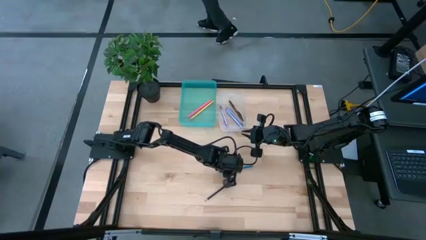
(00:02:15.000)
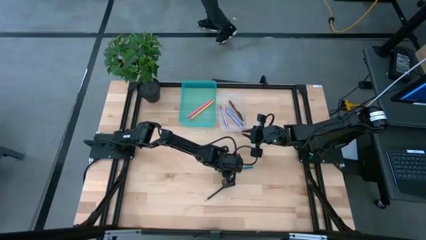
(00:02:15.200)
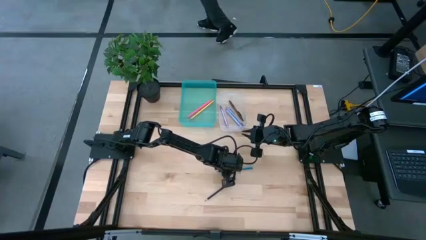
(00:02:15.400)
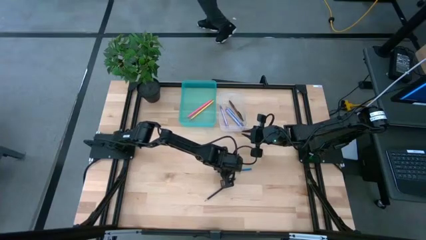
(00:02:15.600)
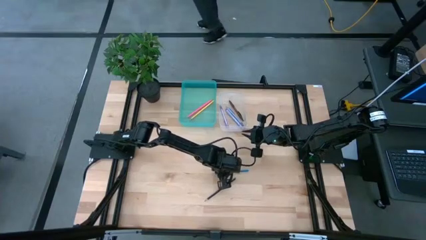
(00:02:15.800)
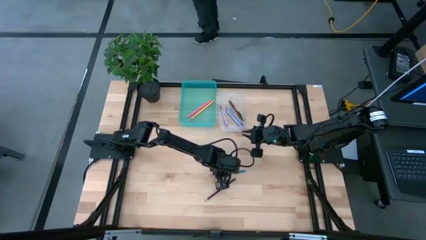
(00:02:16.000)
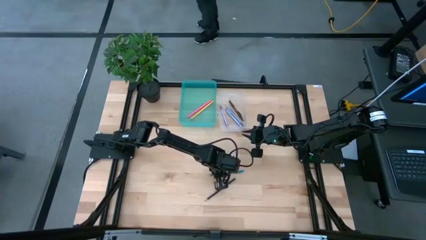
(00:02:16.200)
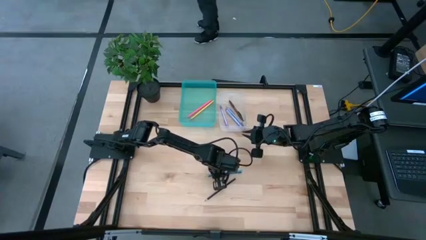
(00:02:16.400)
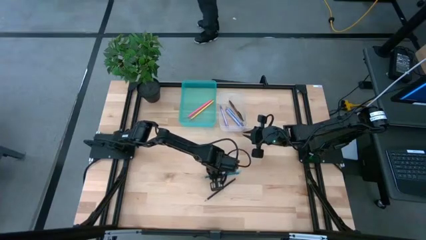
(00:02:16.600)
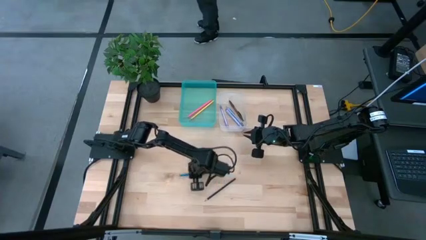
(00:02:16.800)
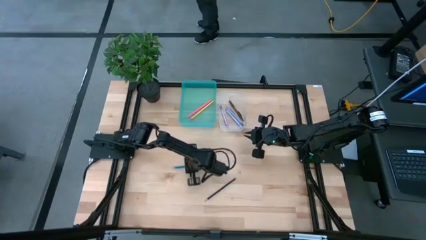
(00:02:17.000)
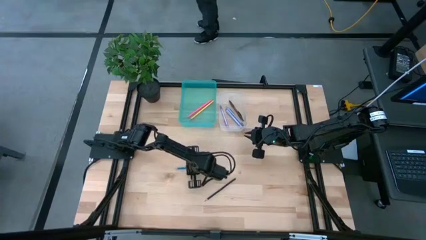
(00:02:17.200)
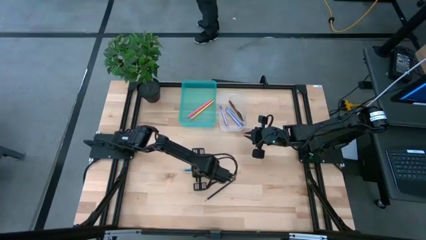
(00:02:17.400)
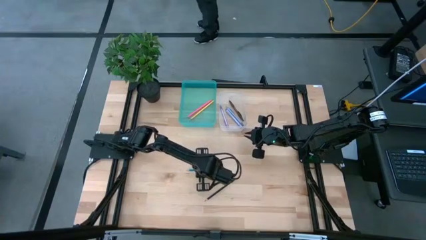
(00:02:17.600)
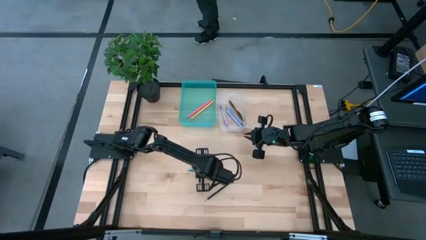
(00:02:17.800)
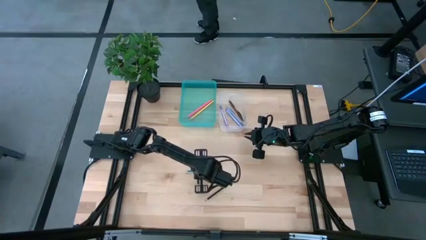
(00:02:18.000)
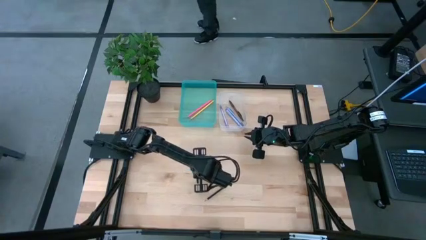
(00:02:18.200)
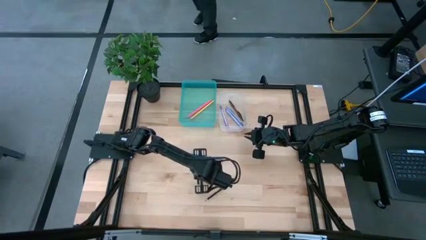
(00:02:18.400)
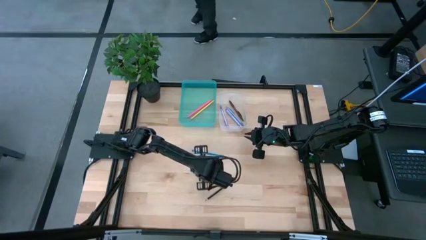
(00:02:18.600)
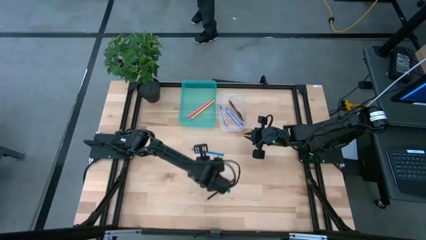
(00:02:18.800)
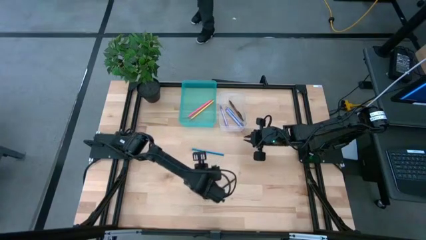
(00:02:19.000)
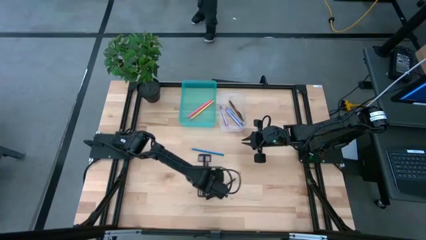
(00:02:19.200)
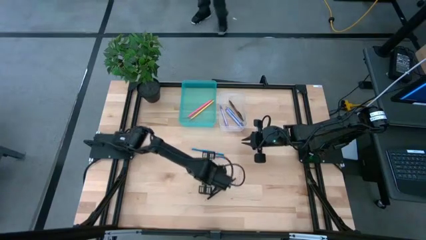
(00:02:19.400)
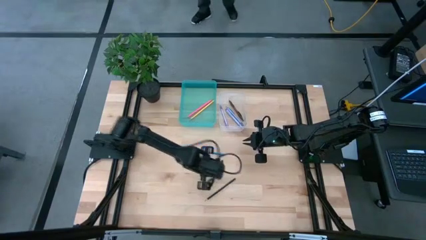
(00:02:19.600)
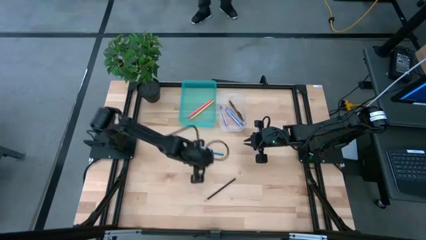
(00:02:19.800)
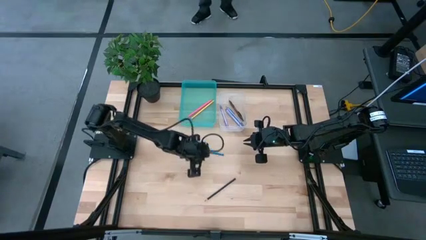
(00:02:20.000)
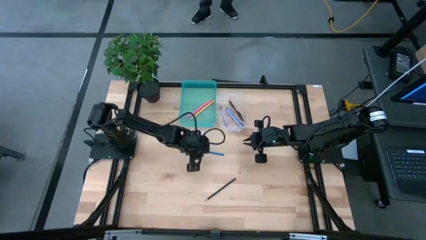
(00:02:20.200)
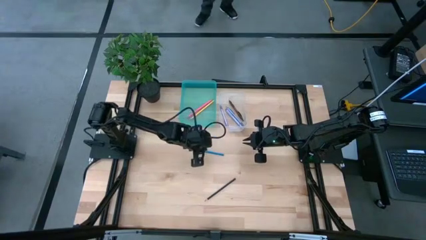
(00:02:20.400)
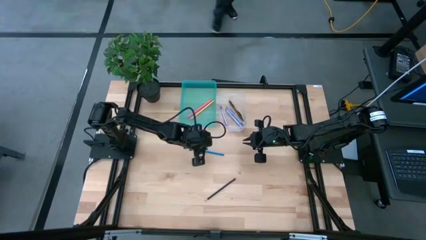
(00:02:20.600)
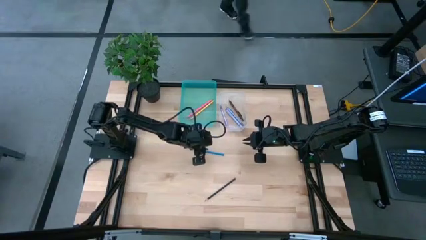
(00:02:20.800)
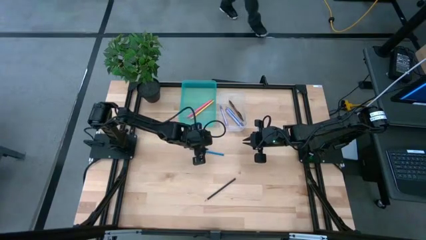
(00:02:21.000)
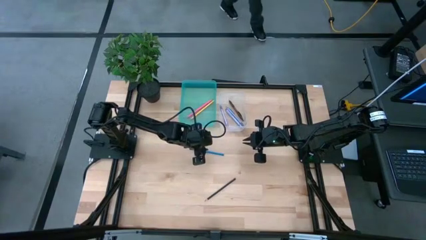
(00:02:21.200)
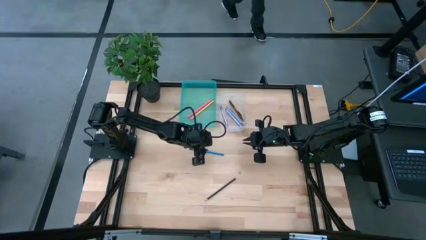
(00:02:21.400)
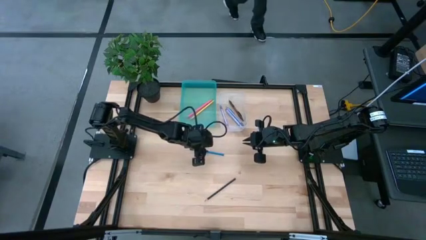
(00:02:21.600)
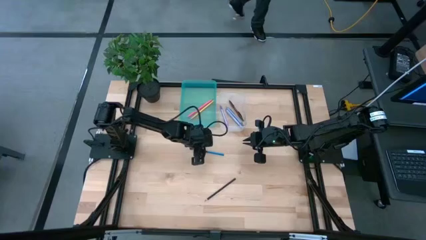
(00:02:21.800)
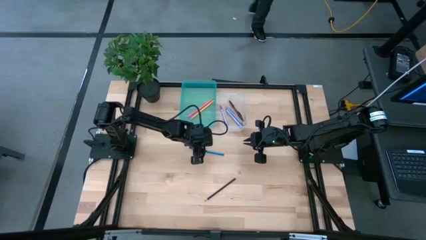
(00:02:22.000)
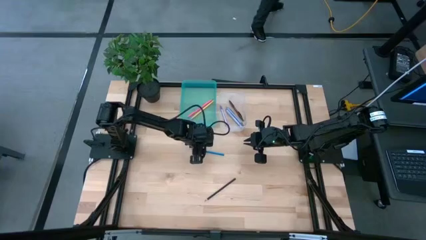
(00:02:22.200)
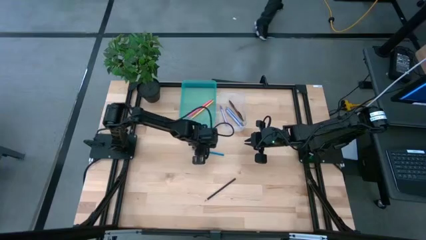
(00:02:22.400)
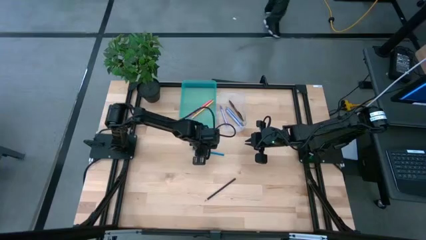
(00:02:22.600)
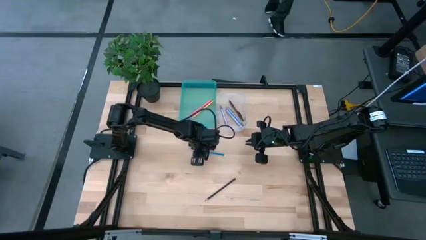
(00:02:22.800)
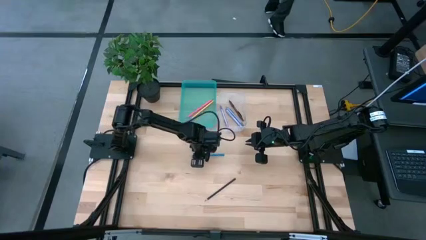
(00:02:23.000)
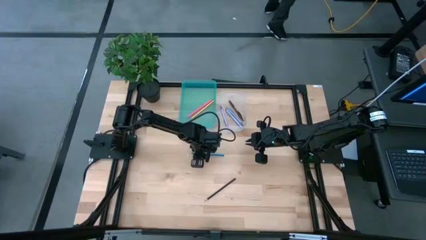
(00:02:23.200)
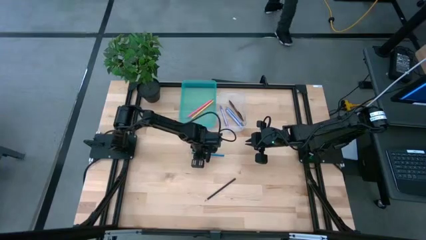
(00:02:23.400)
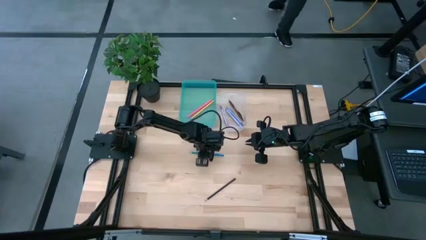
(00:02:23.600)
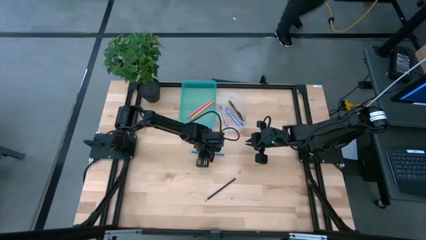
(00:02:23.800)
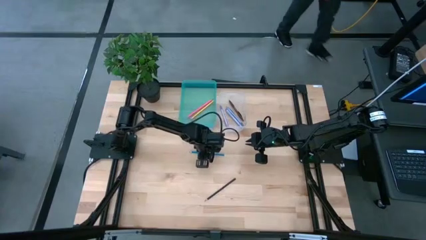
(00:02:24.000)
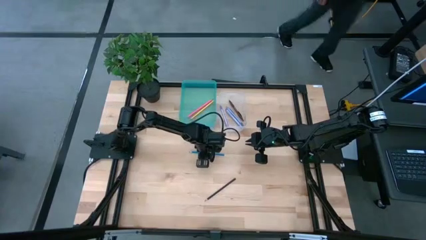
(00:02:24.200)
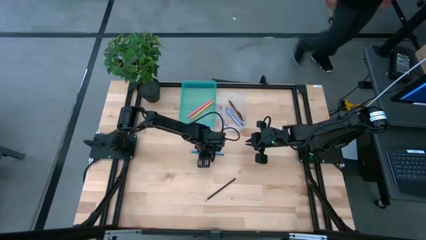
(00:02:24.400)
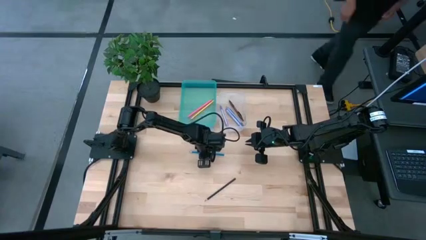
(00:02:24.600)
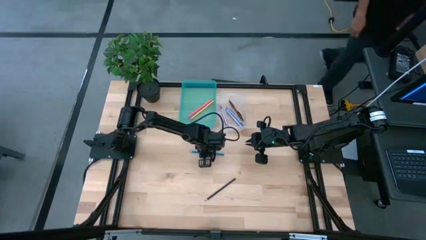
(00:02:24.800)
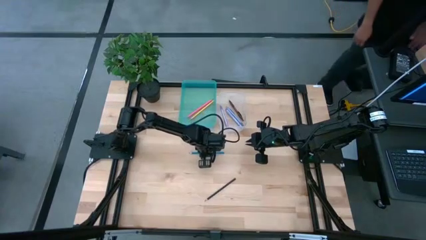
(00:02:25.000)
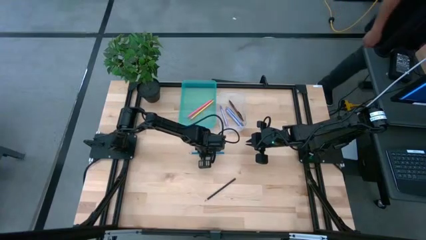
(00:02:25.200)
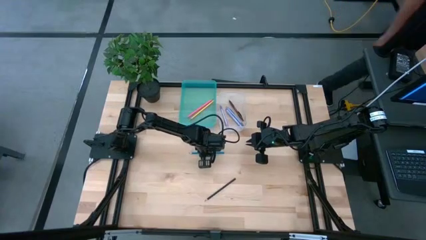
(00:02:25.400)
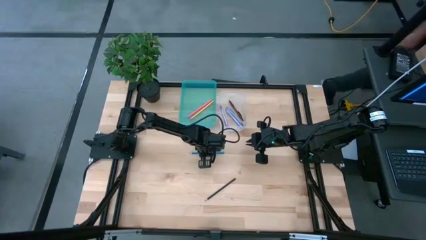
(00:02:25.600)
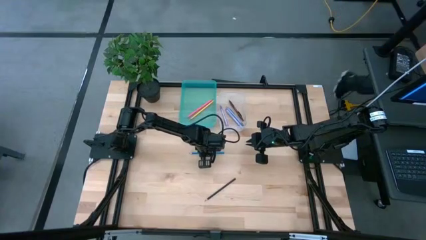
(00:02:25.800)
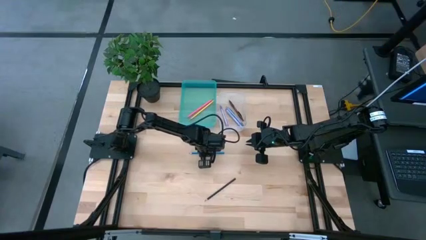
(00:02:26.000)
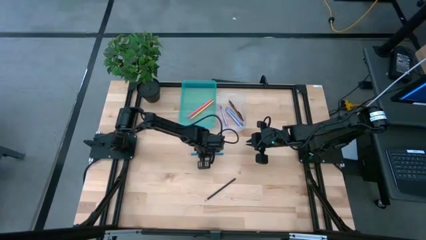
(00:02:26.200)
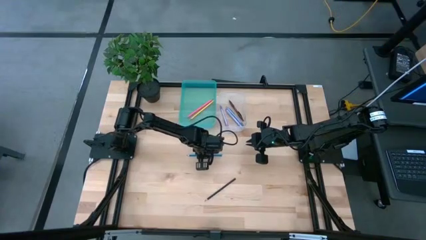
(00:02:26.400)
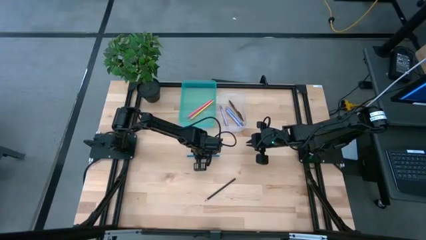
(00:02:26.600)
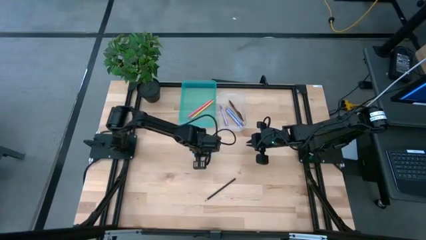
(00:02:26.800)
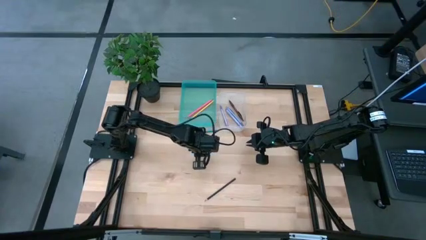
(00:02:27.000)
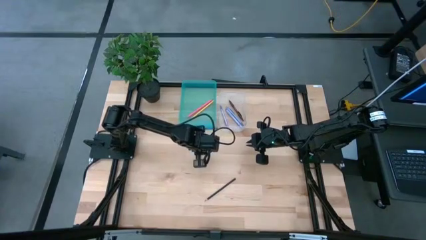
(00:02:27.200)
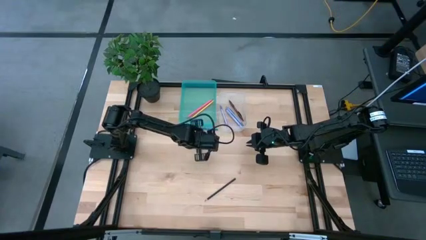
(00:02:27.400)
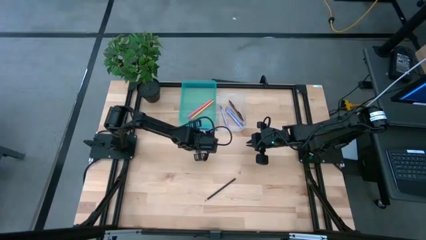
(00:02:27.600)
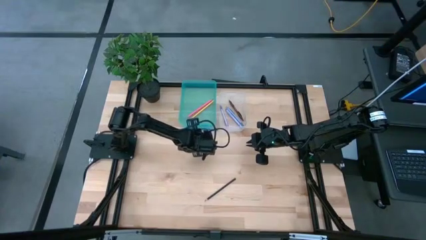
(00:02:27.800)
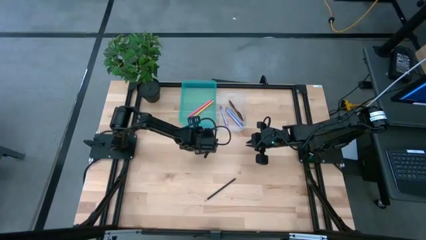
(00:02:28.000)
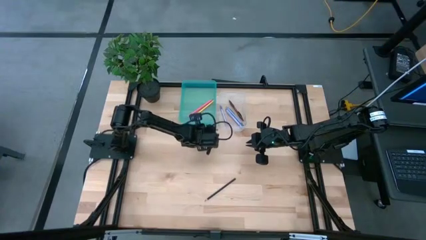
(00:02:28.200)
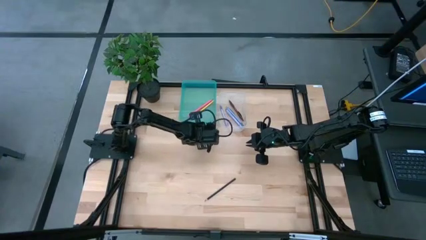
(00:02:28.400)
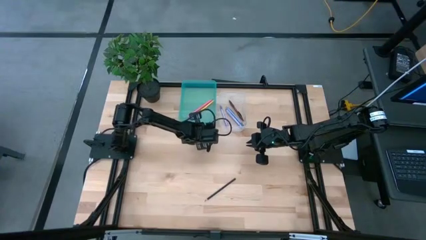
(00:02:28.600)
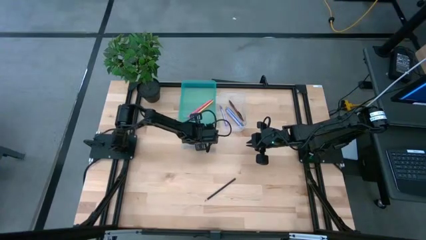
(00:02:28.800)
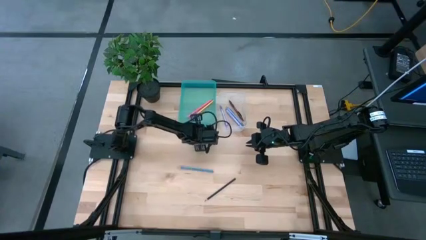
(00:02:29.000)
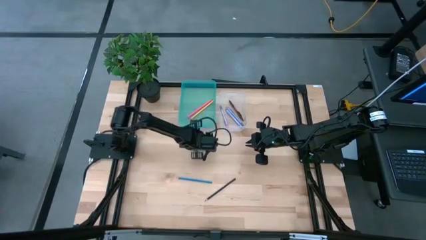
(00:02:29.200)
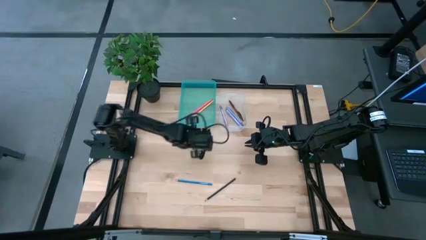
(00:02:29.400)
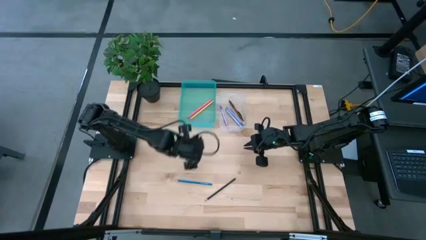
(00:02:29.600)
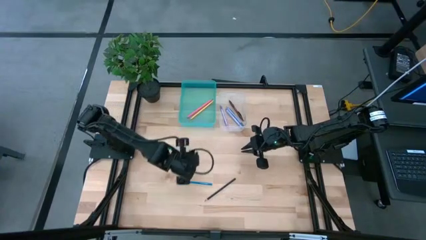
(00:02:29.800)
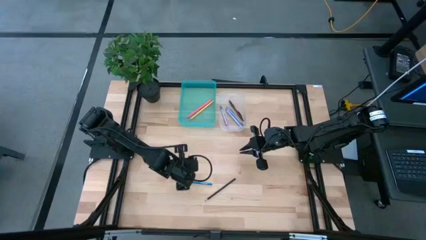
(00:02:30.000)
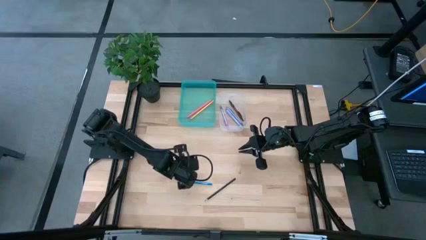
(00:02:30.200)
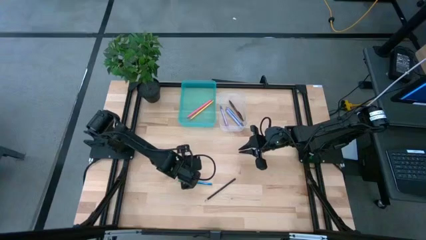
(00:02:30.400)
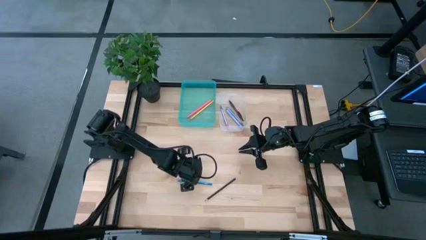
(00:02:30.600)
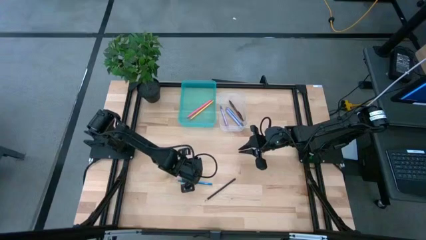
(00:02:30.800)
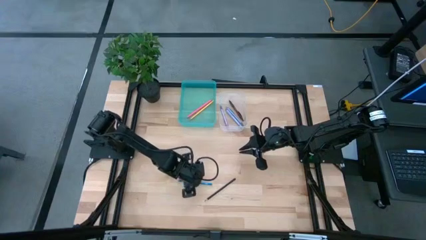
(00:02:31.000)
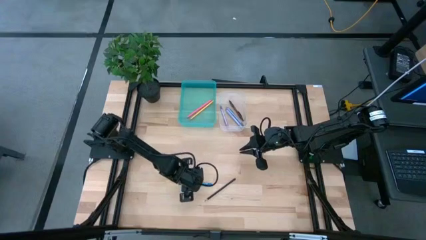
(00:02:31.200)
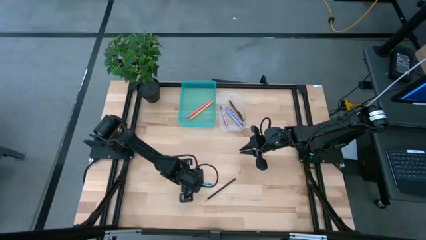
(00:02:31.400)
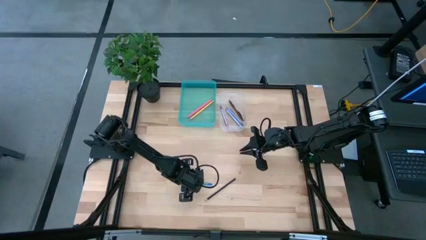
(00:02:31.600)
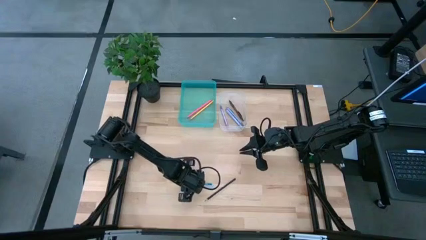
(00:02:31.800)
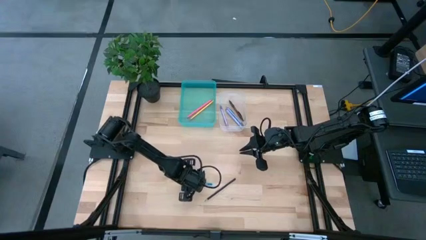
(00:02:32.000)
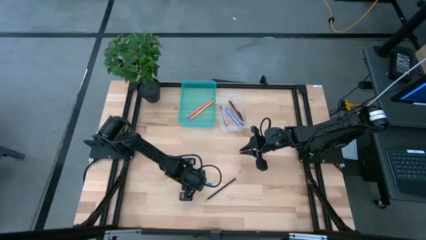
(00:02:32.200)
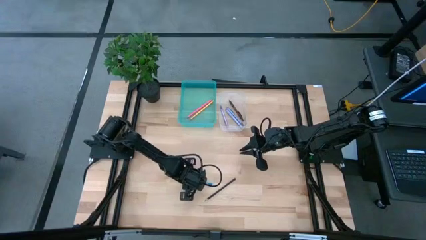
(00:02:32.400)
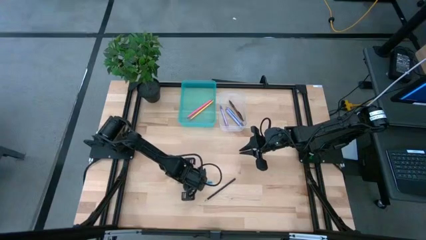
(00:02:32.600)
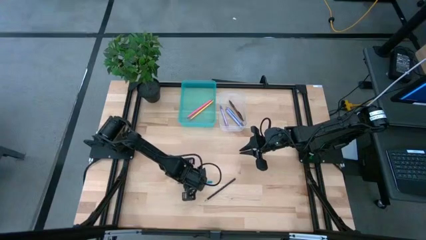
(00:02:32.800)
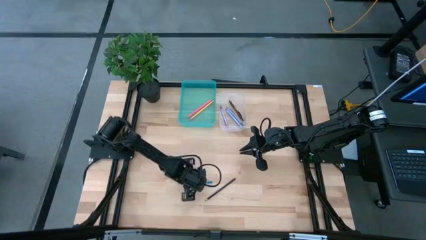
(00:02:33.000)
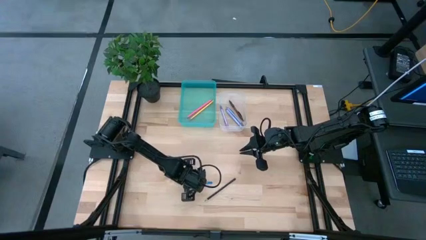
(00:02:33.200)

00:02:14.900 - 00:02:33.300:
Task: Sort pens & pencils
Put the blue pencil into the blue bin
